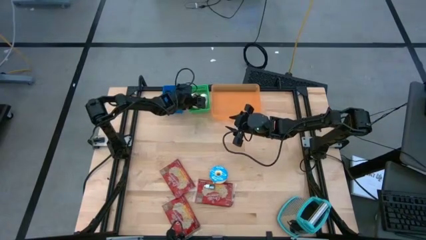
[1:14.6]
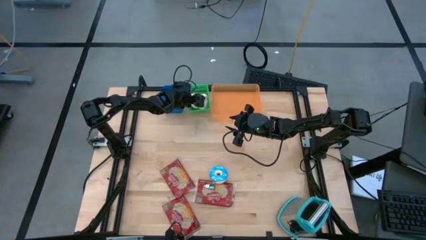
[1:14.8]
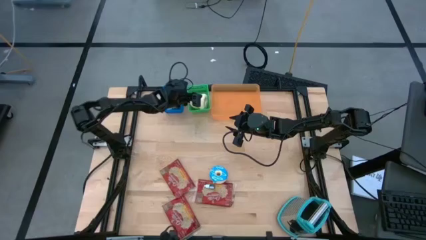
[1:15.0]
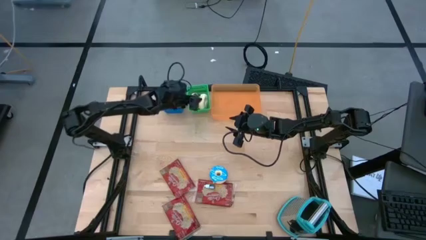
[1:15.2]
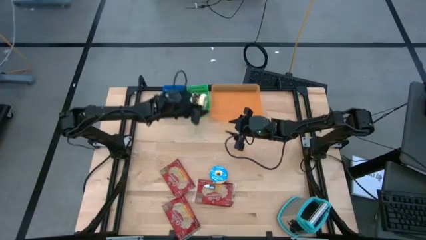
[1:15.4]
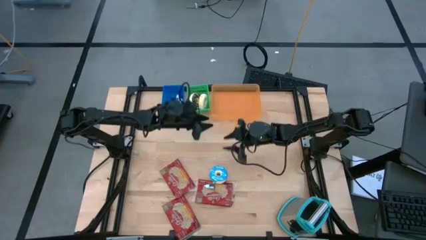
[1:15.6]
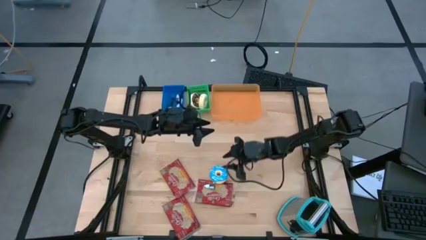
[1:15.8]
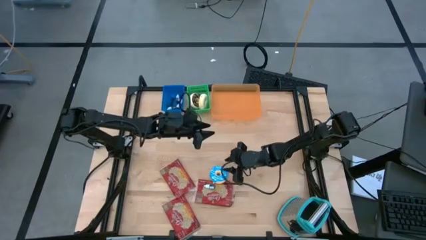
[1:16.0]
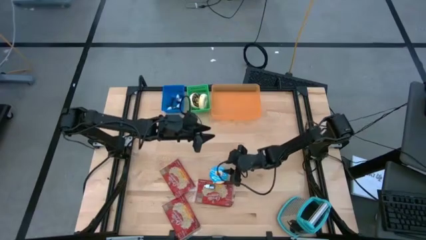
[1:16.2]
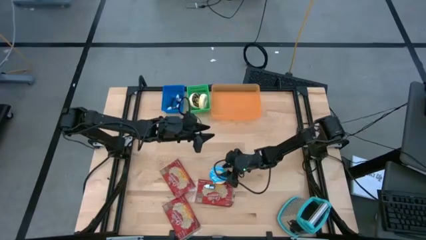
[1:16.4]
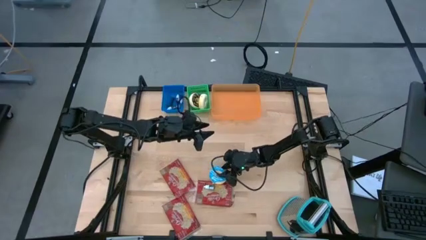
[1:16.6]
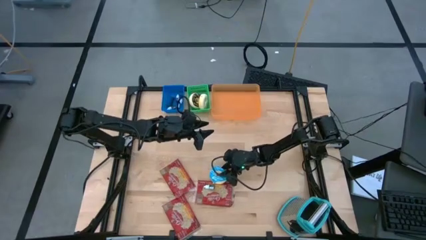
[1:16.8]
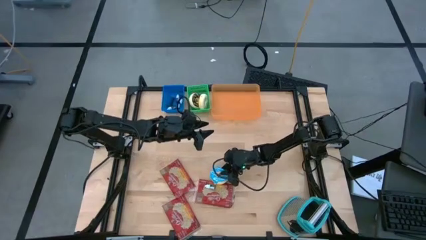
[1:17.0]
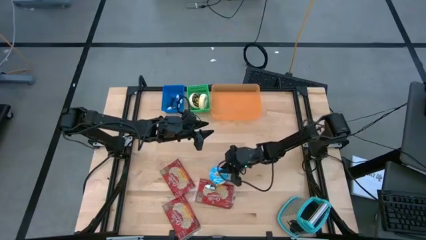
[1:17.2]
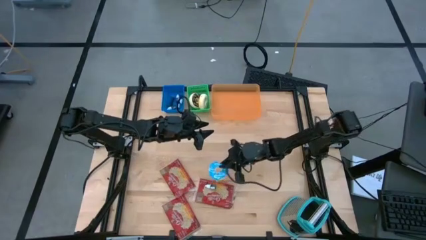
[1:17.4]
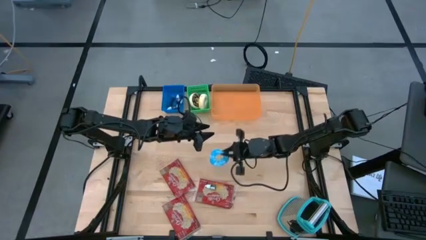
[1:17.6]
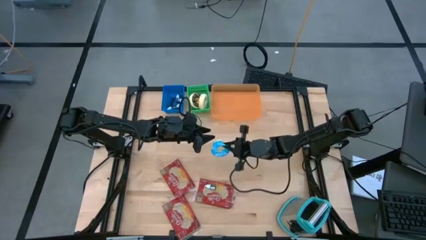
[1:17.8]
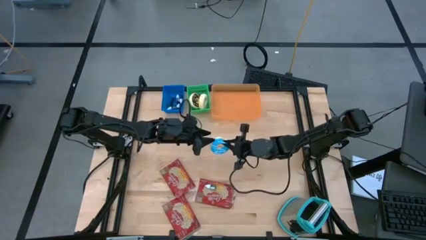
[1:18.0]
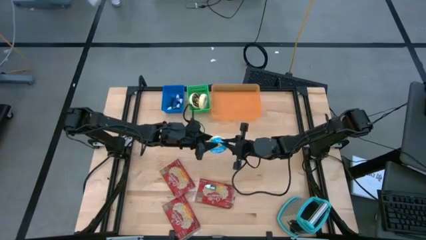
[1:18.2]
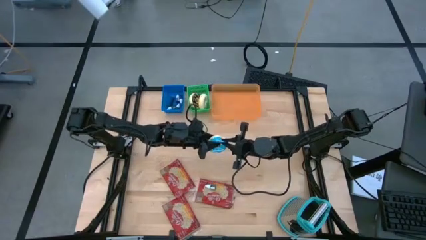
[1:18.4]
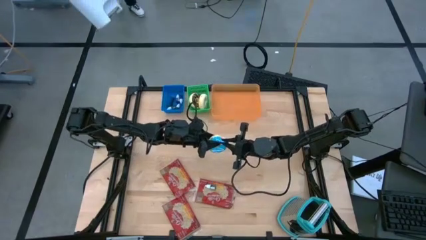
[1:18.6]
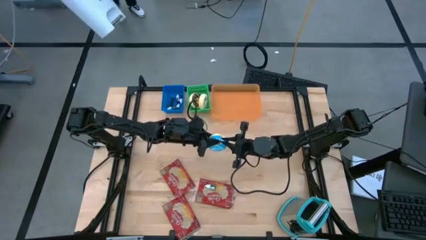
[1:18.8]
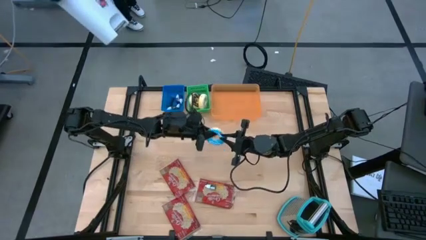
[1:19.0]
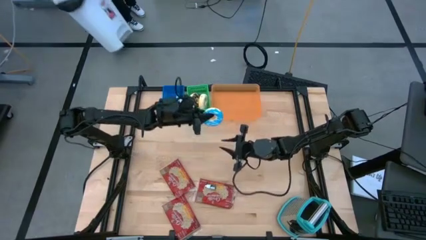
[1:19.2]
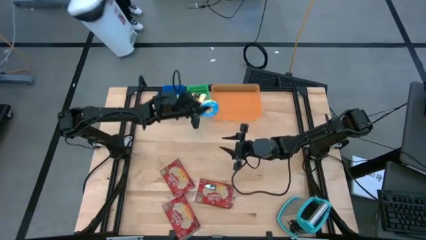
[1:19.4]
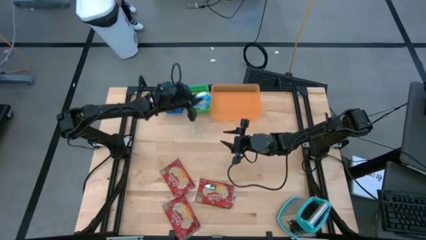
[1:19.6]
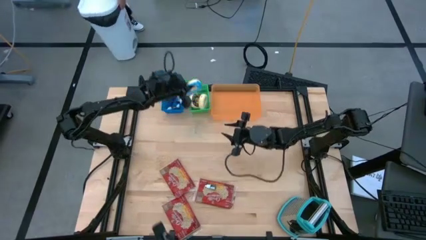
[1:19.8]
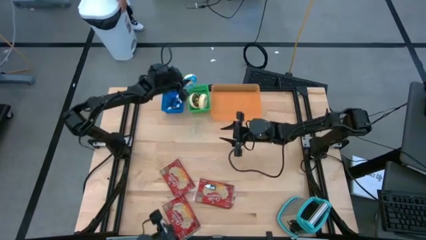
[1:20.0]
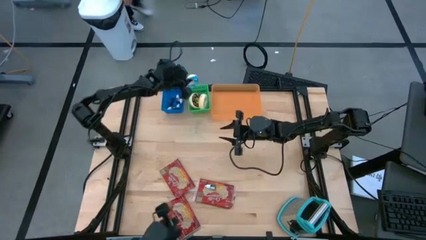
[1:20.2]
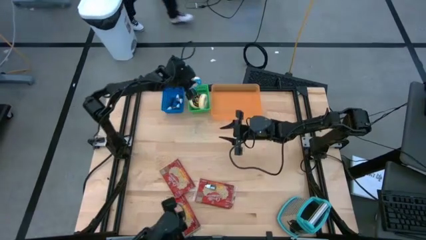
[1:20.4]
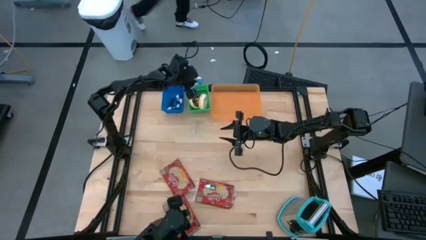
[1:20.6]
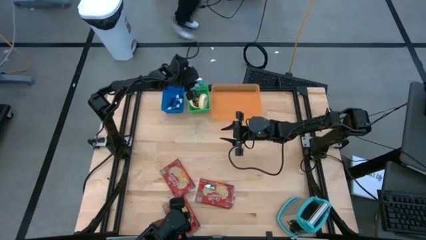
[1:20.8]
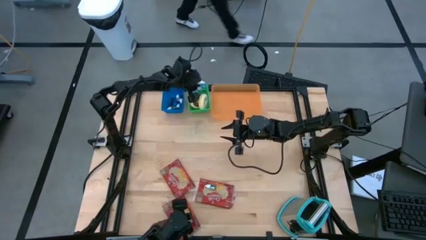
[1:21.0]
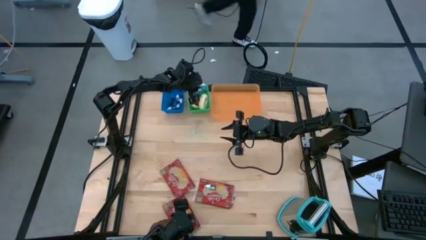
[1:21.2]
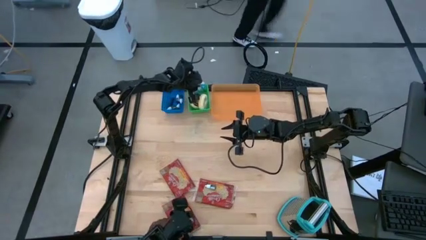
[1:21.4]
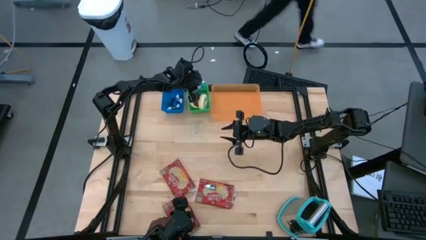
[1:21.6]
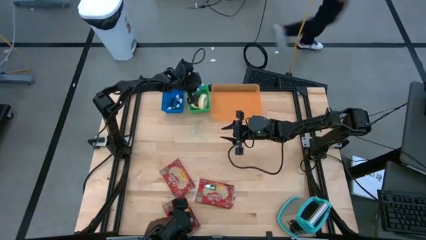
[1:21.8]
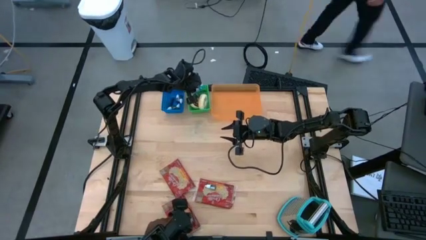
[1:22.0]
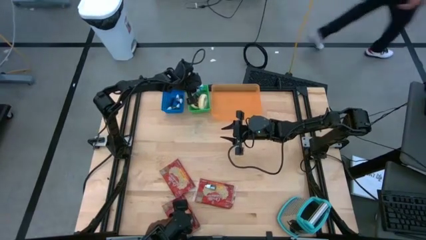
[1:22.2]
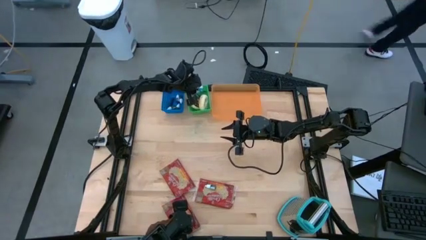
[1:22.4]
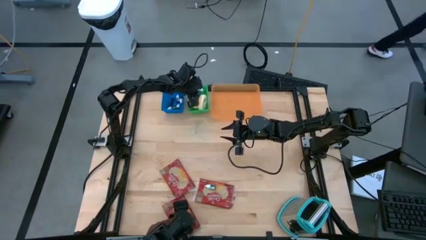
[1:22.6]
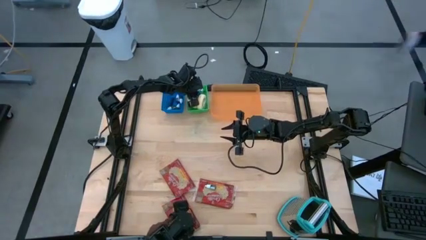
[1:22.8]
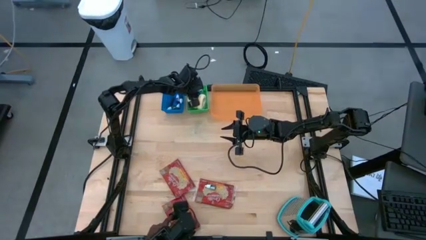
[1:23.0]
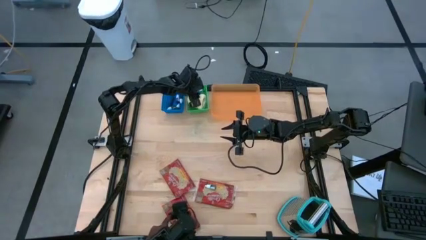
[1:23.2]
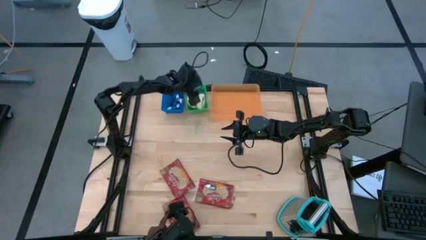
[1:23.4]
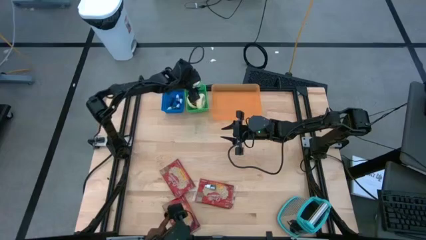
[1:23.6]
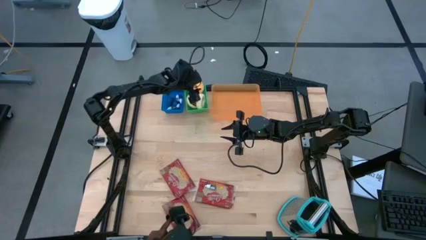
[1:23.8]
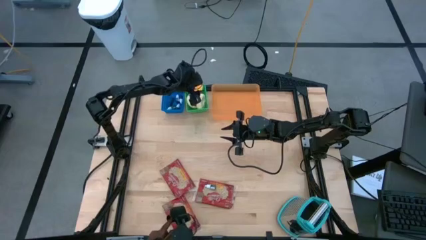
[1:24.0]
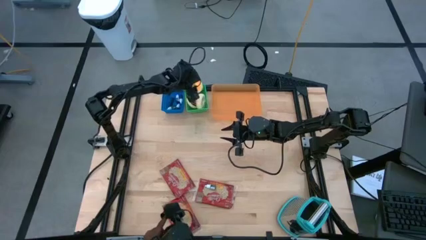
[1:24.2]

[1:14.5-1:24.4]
Put the blue donut into the green bin
